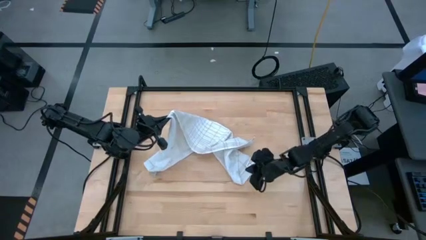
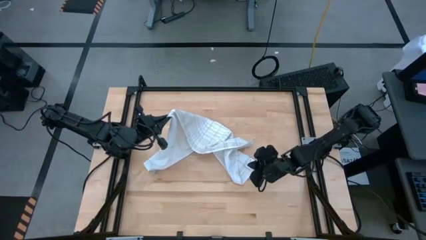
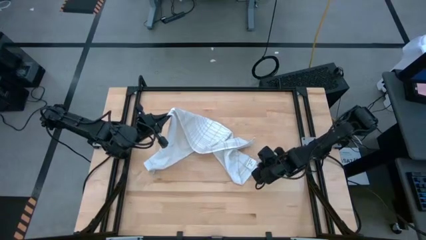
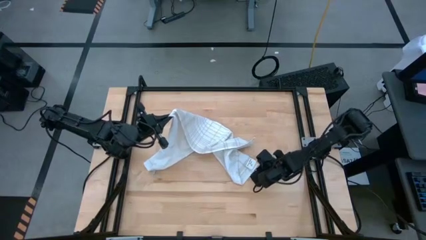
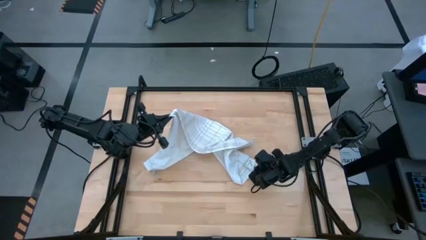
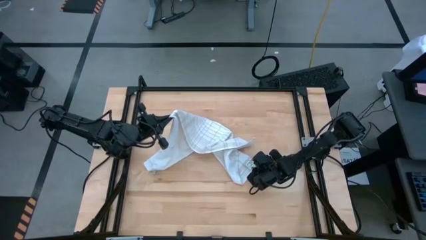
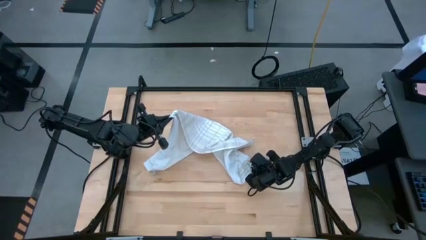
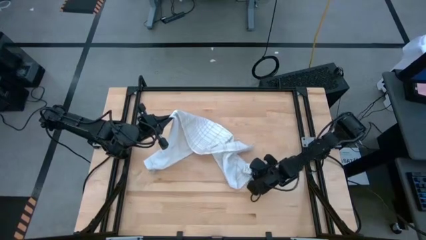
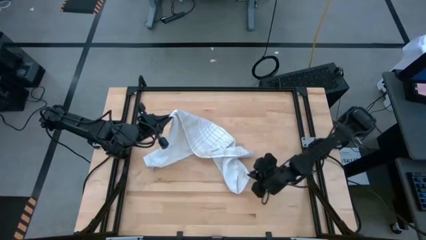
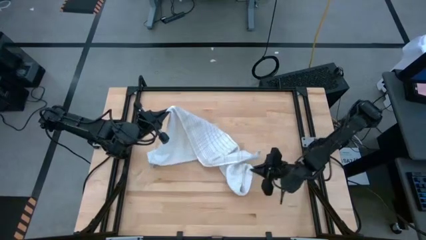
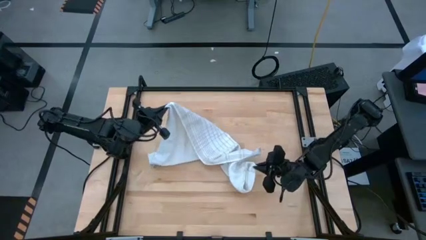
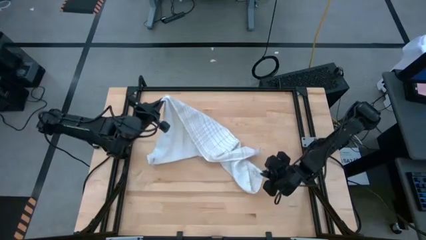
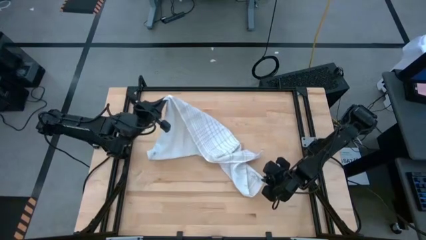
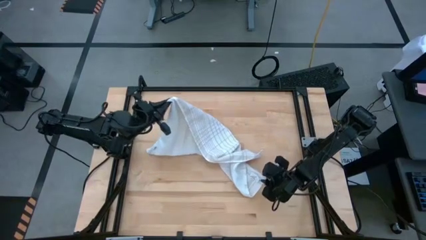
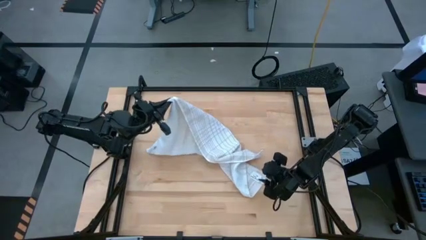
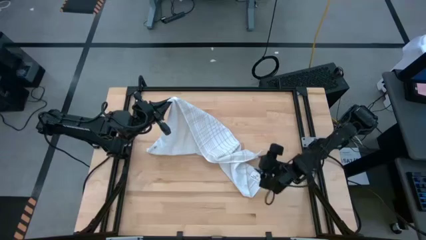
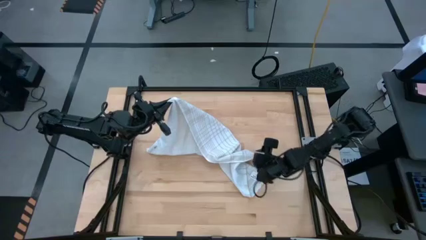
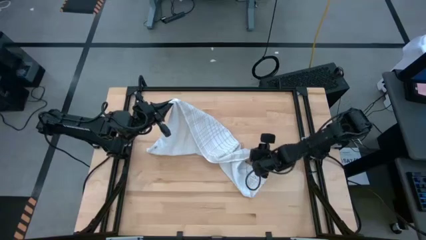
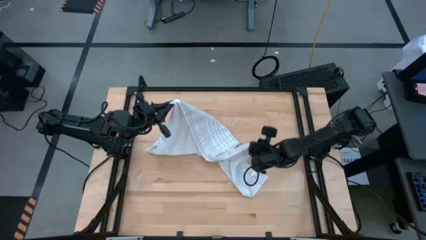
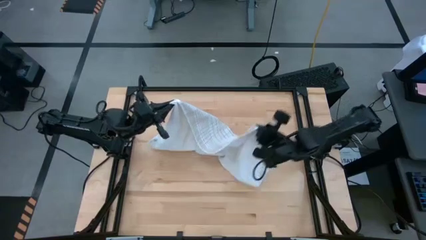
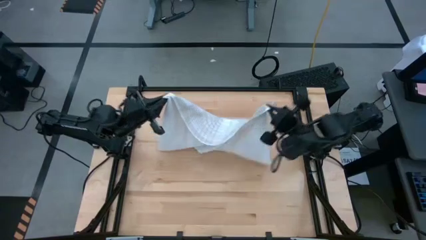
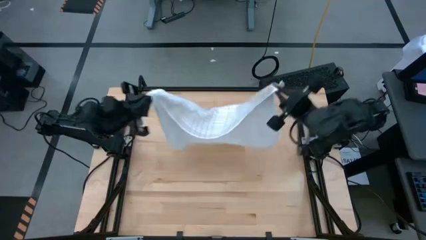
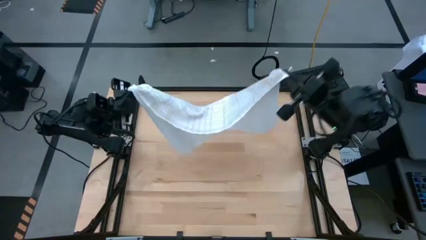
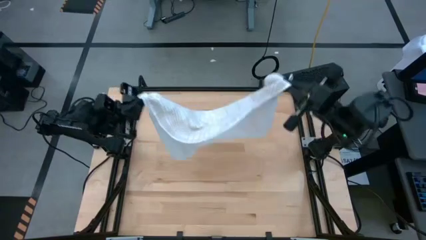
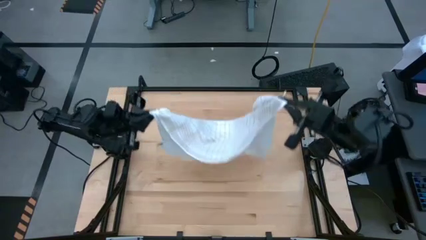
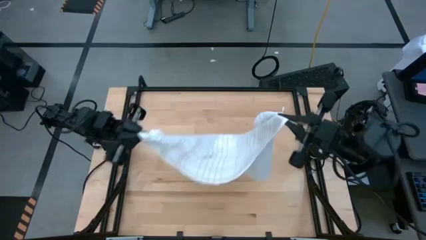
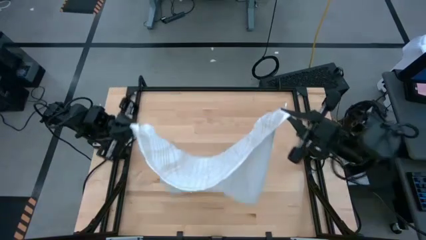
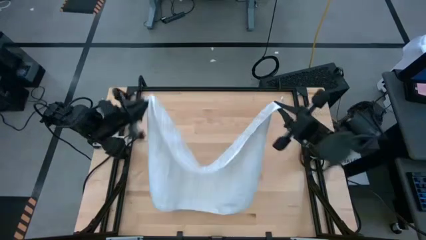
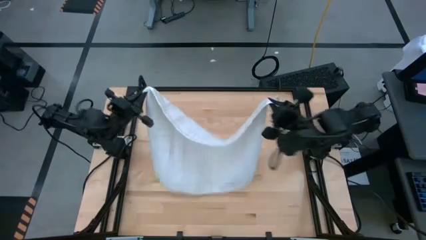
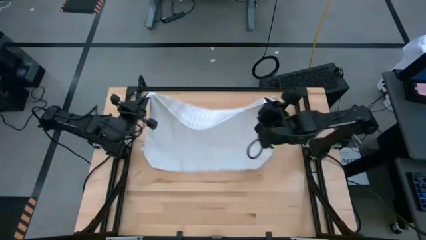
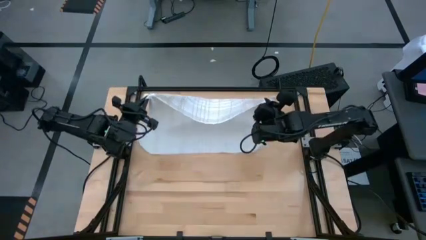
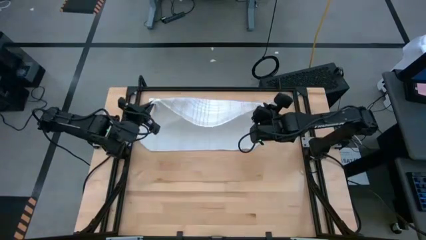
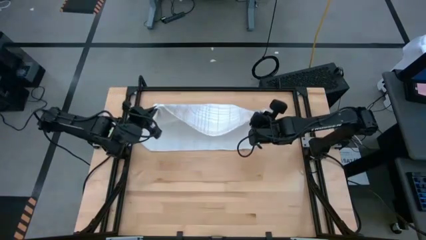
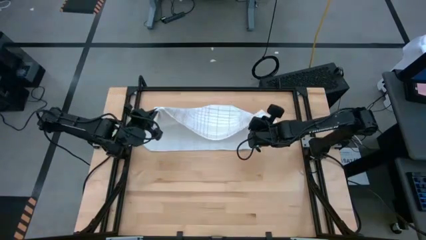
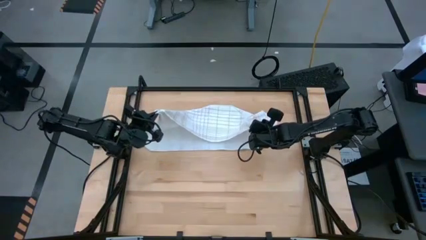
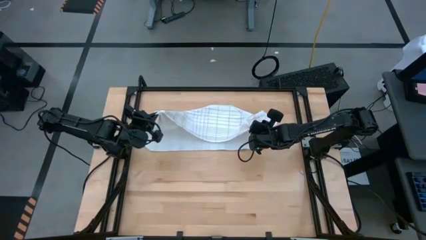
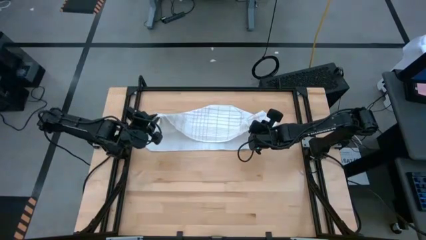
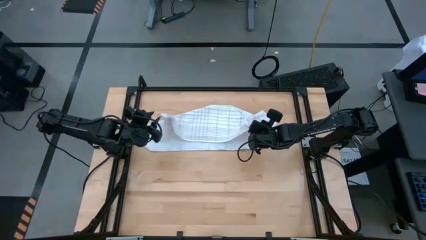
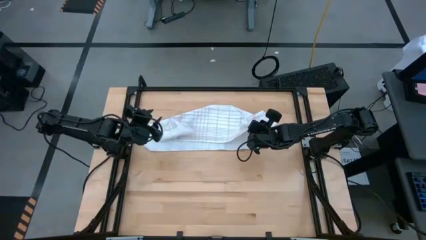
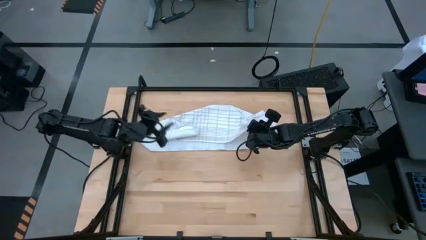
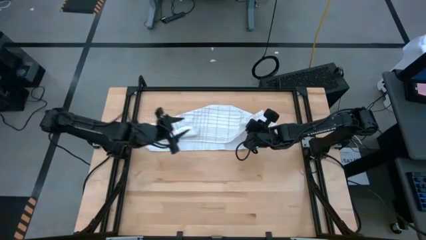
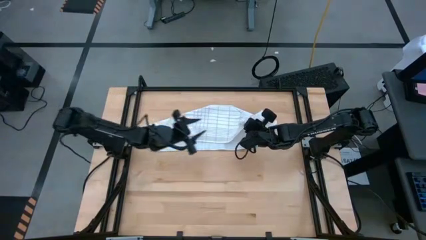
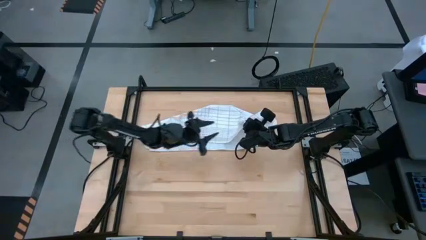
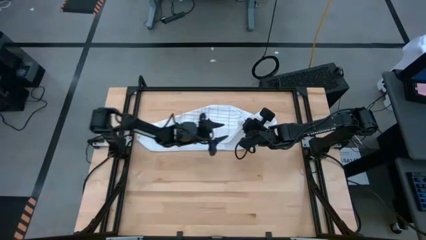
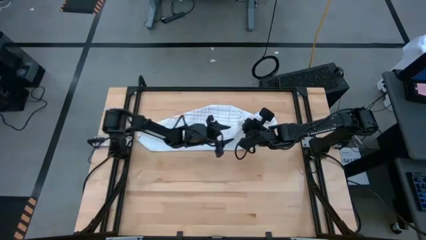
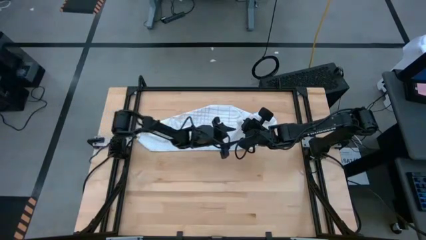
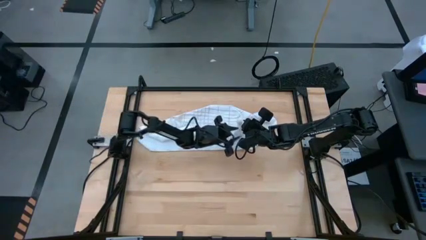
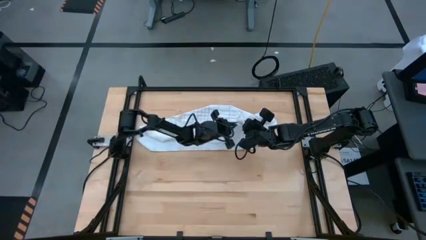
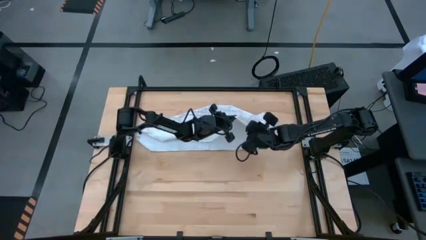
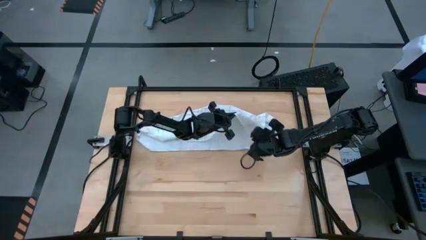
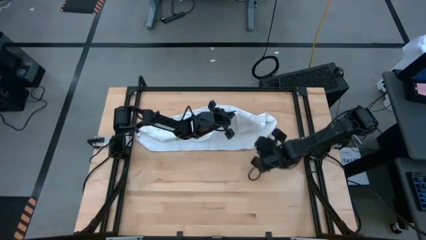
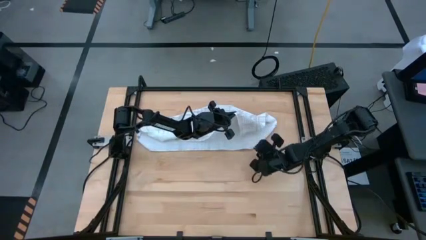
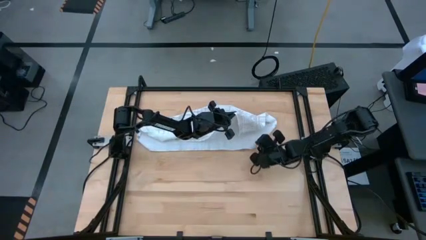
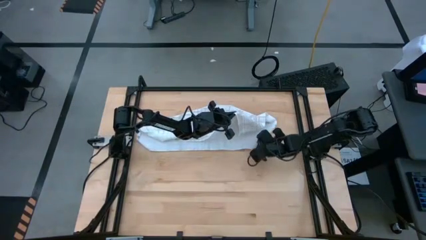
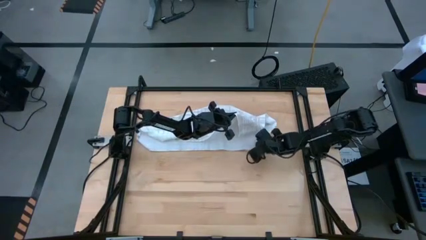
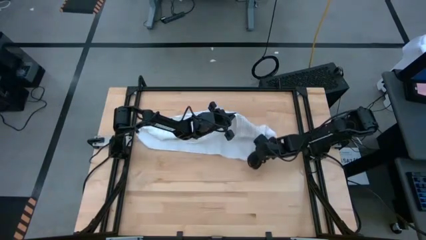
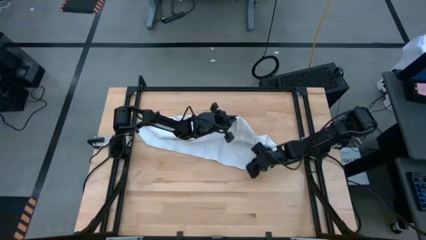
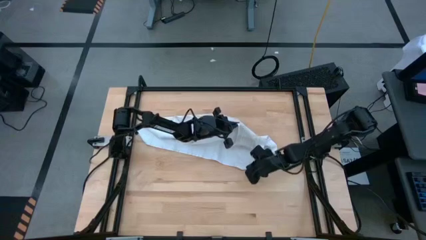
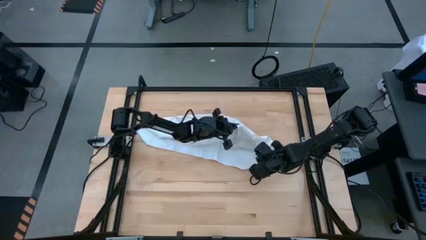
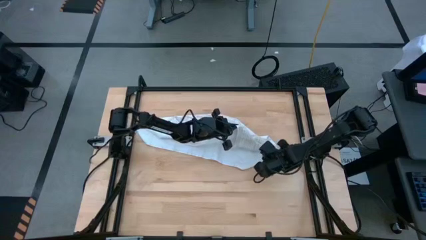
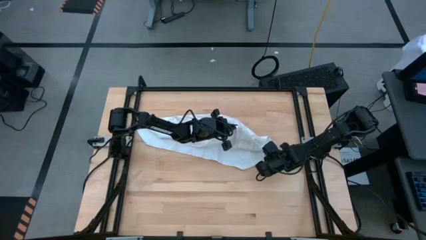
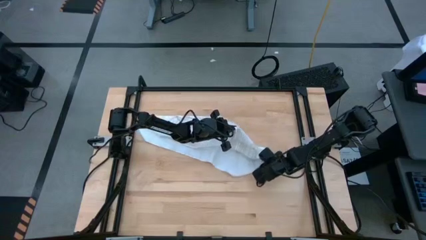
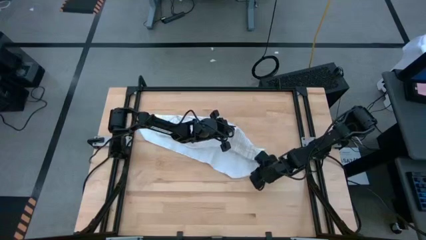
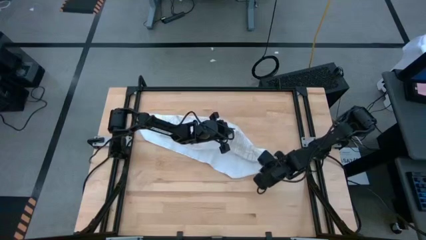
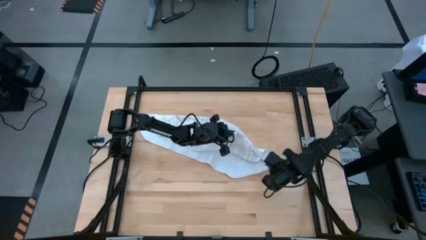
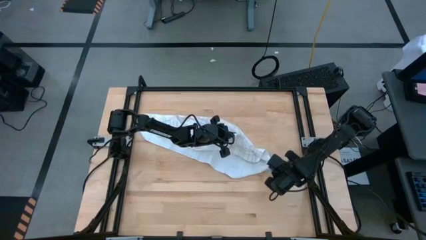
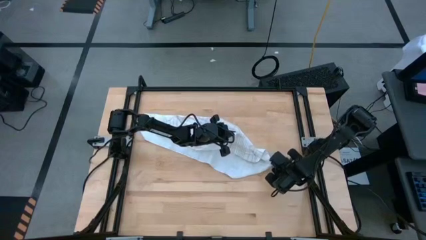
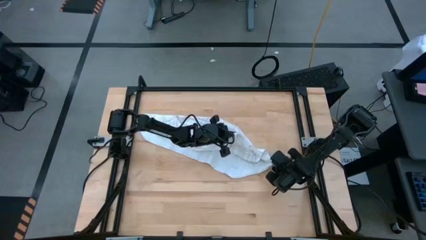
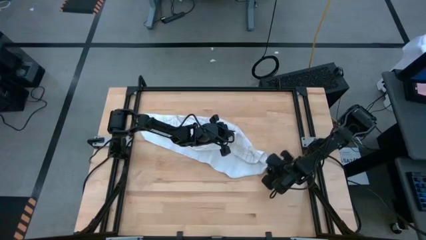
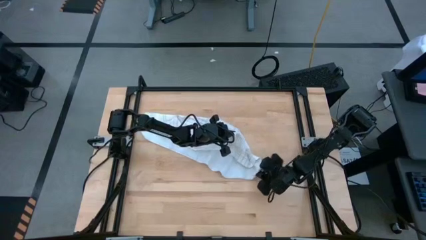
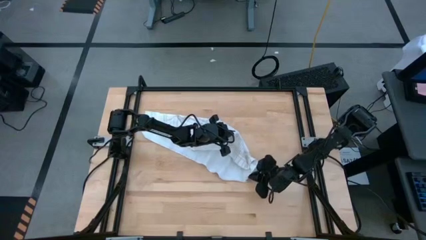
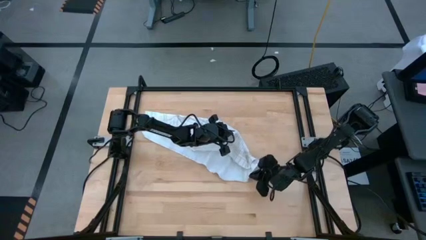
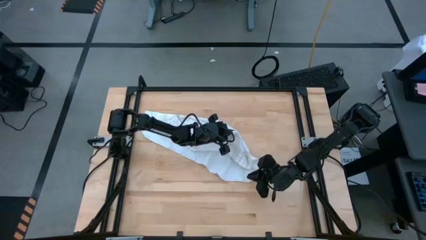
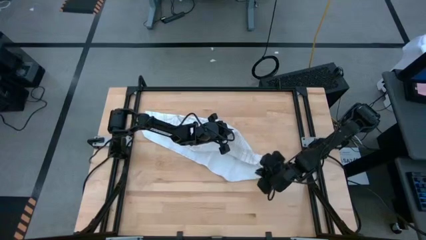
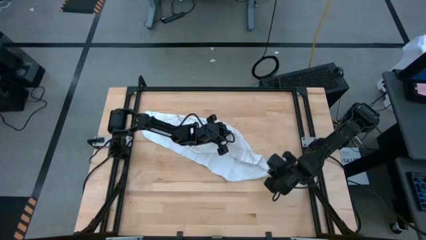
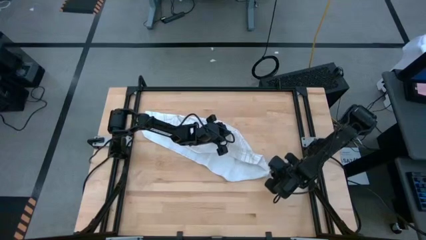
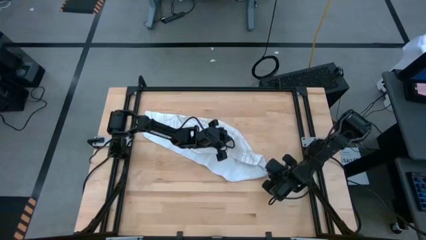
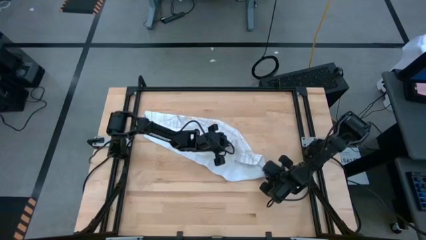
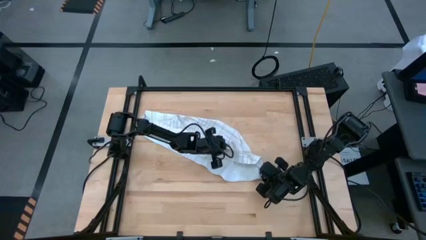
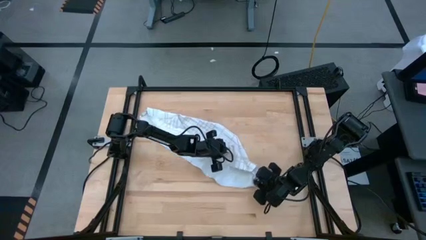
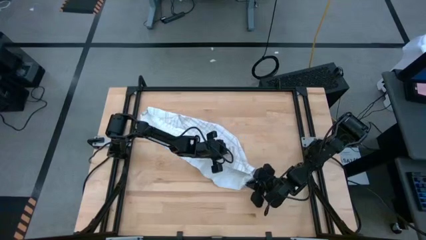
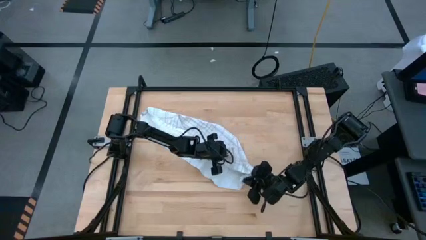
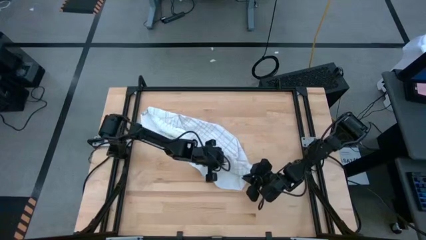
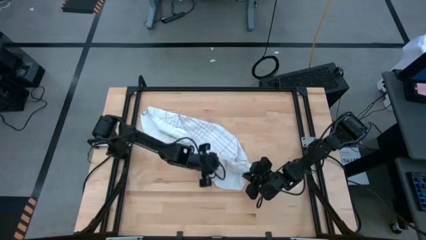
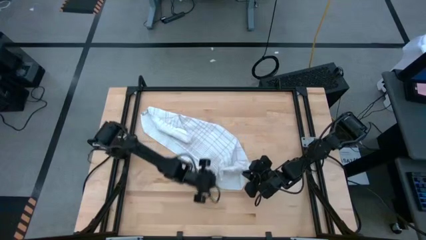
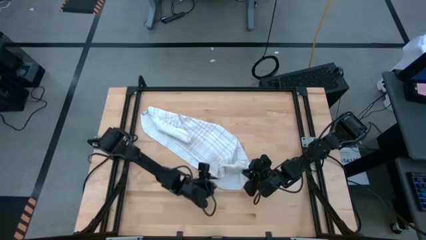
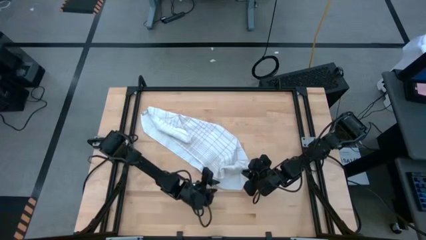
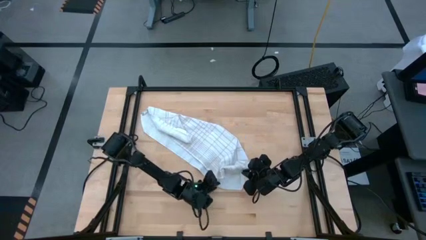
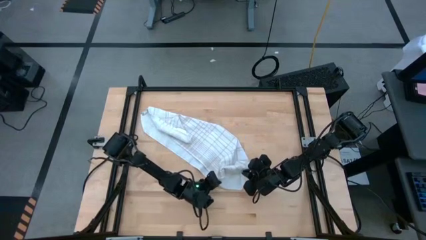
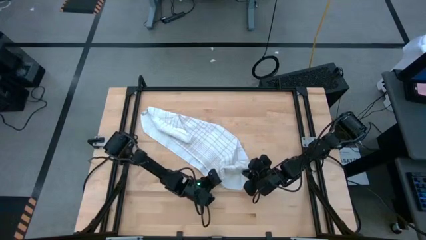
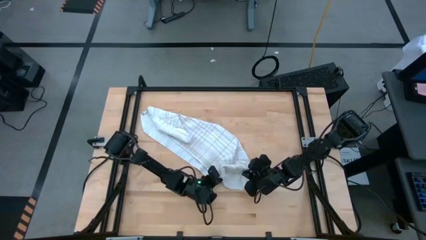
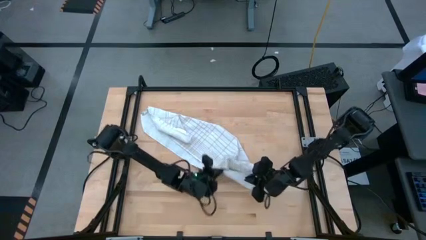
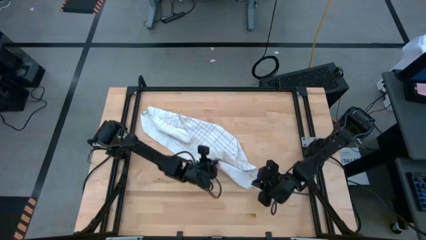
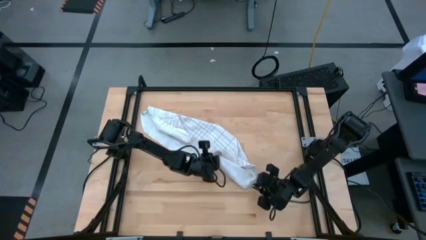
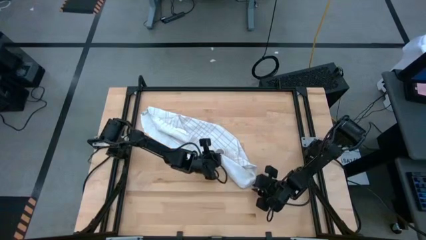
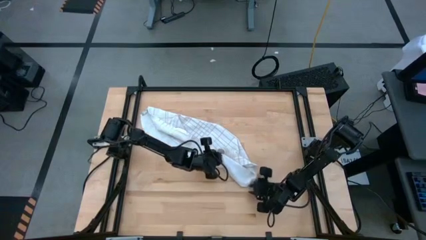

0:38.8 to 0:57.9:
Task: Roll towel
Fold the white towel
